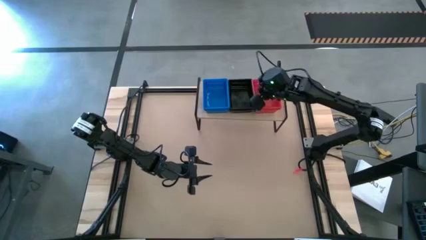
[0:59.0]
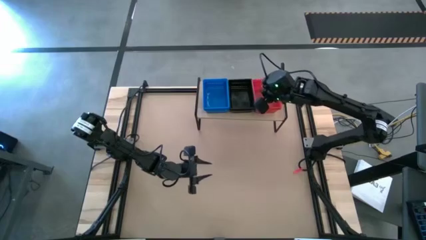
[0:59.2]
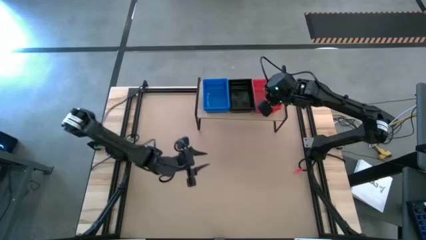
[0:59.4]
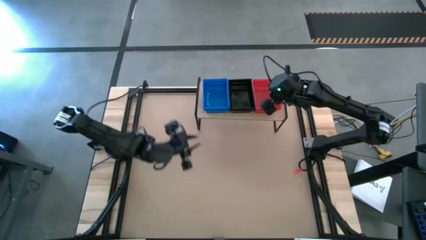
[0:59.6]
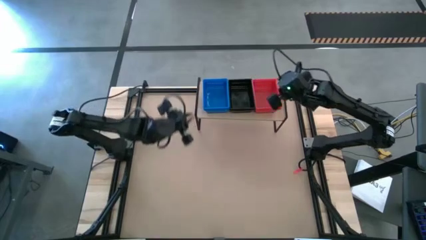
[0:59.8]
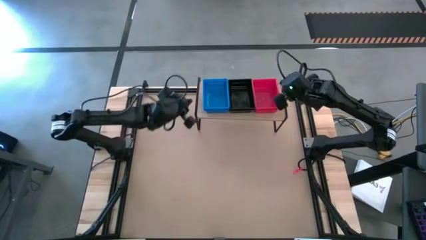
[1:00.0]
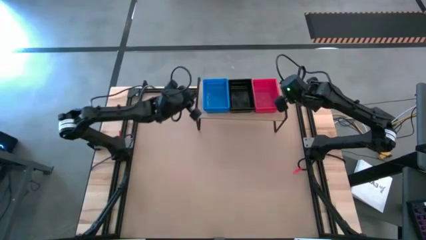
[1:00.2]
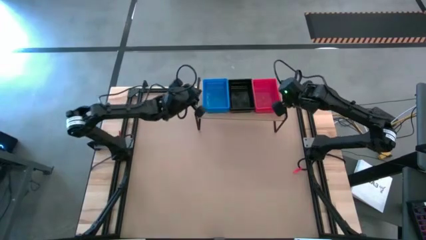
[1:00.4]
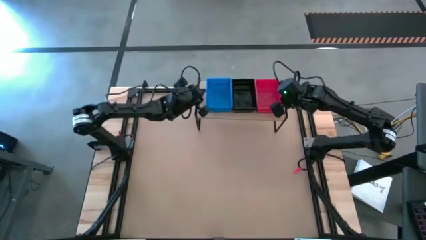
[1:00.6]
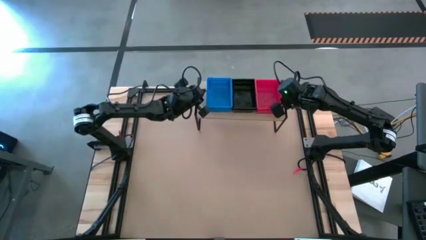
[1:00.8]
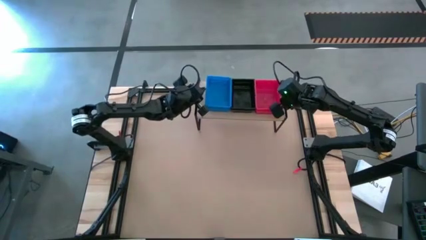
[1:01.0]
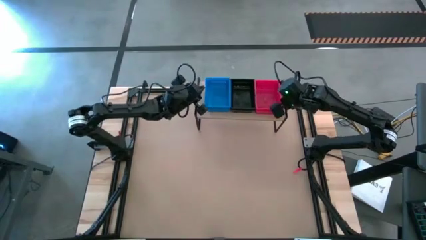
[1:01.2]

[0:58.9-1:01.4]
Task: Stack baskets on shelf by color
Adjust the stacked baskets on the shelf

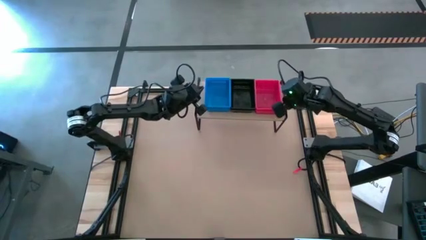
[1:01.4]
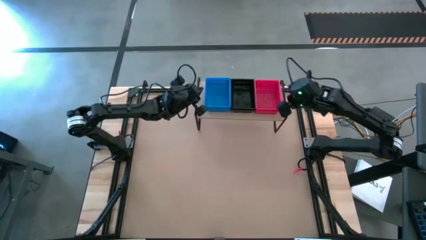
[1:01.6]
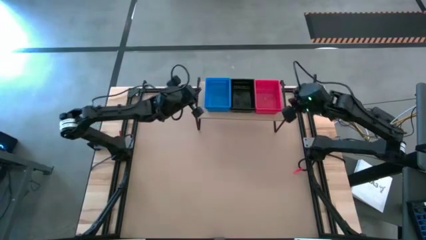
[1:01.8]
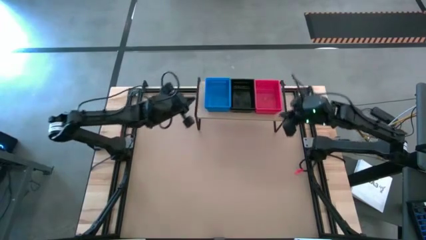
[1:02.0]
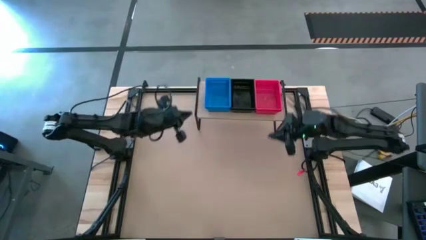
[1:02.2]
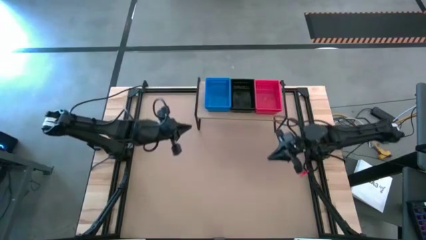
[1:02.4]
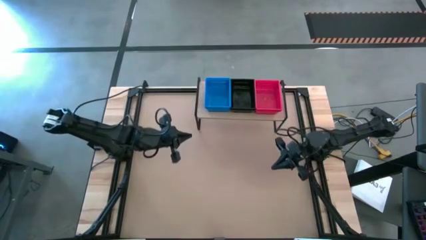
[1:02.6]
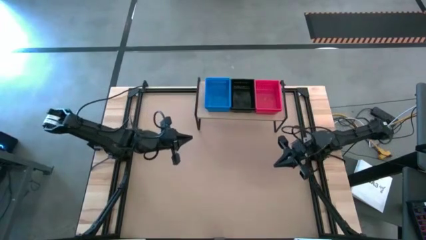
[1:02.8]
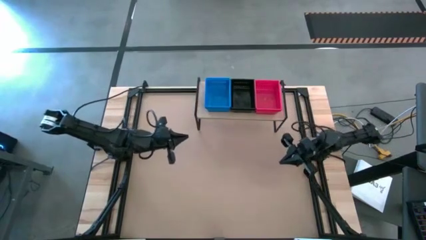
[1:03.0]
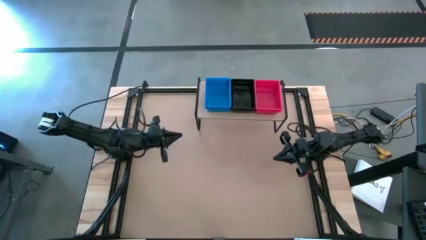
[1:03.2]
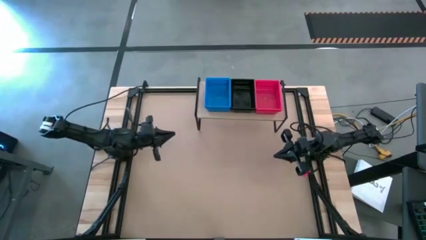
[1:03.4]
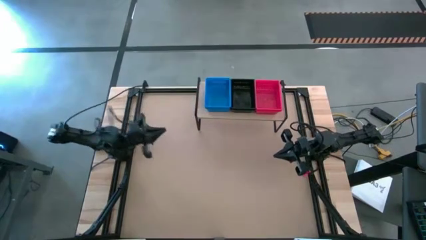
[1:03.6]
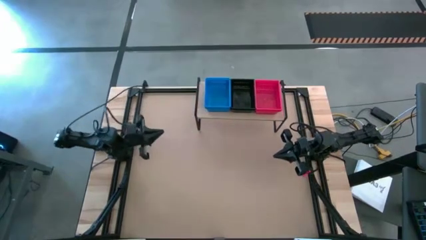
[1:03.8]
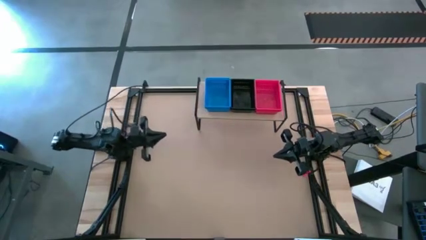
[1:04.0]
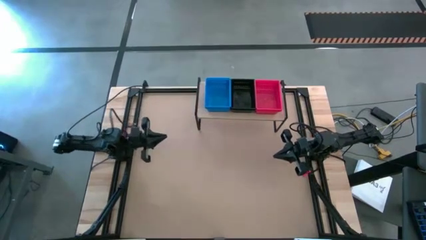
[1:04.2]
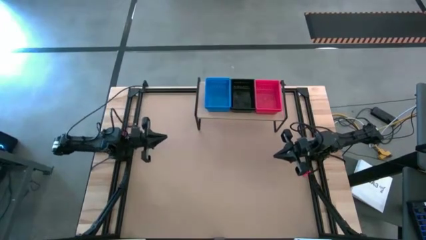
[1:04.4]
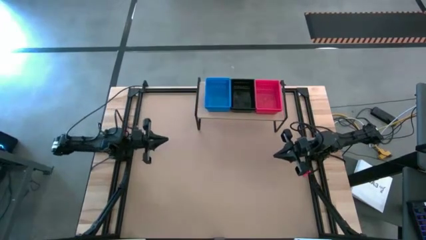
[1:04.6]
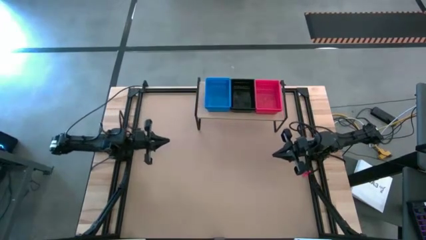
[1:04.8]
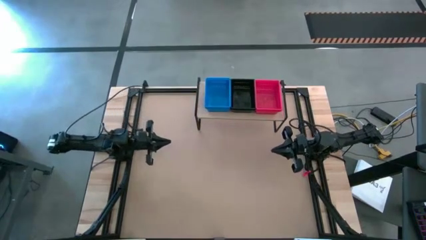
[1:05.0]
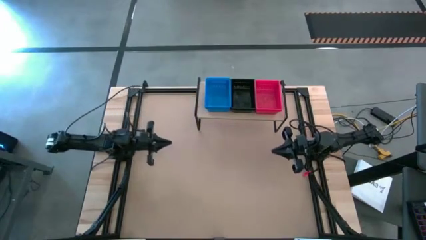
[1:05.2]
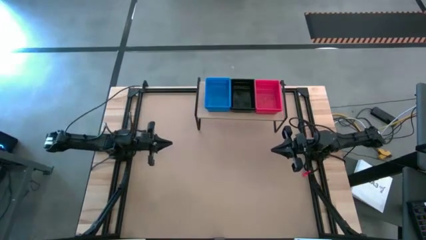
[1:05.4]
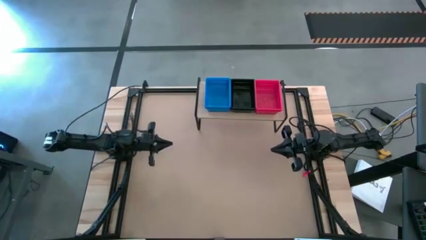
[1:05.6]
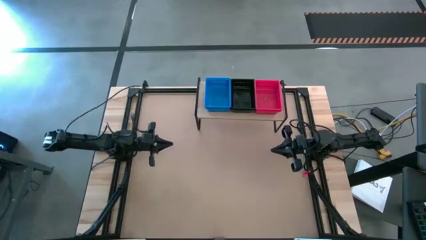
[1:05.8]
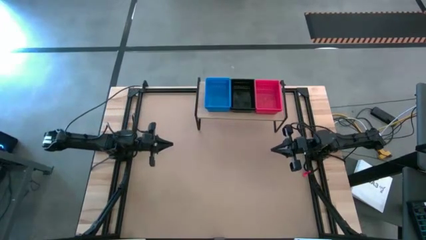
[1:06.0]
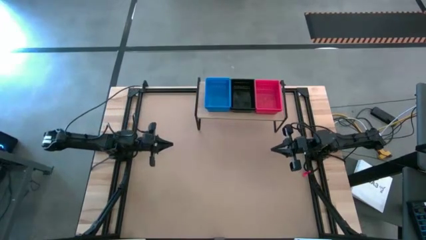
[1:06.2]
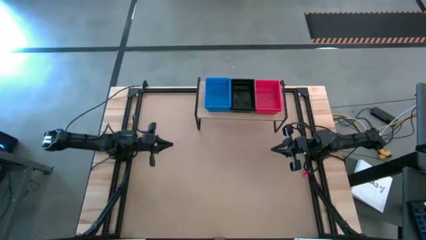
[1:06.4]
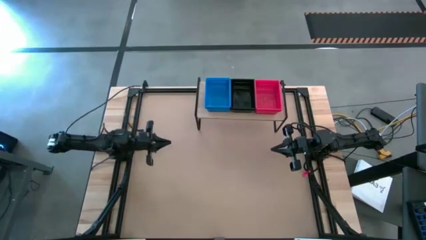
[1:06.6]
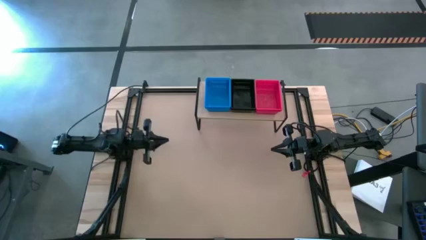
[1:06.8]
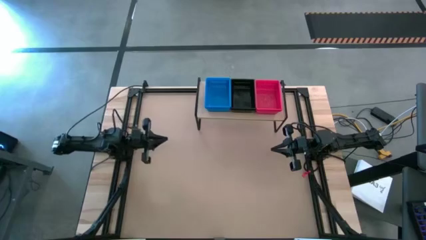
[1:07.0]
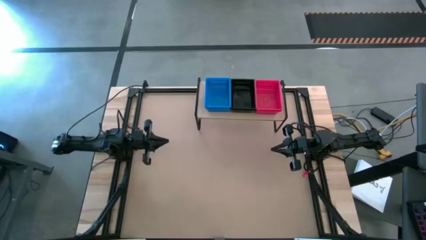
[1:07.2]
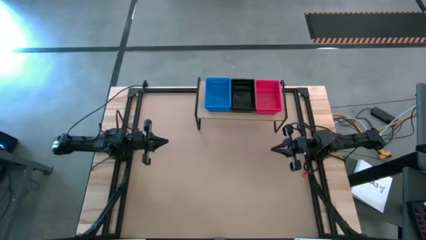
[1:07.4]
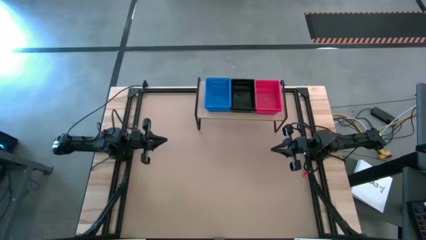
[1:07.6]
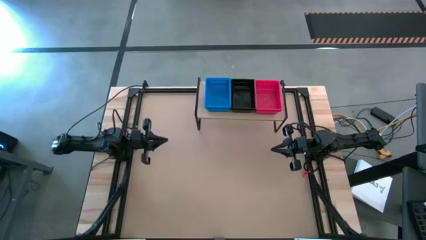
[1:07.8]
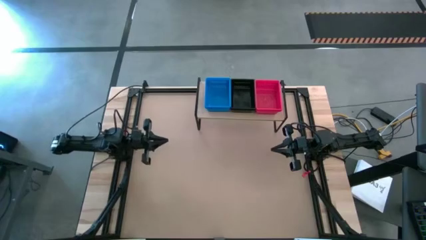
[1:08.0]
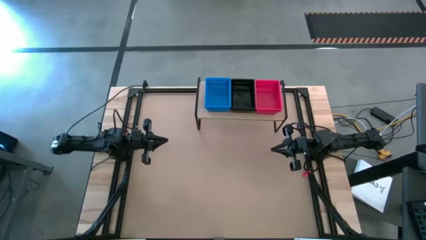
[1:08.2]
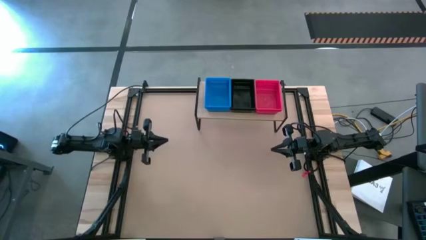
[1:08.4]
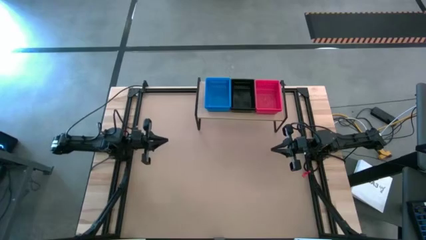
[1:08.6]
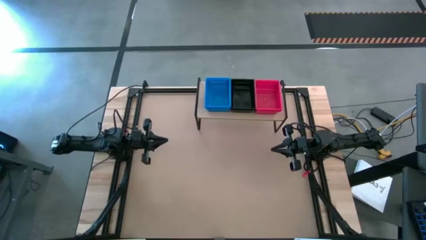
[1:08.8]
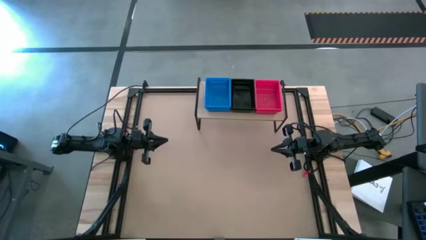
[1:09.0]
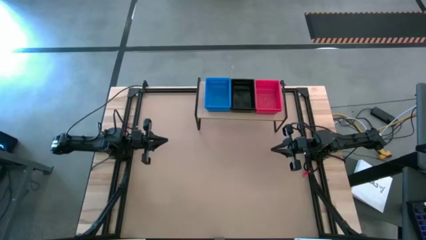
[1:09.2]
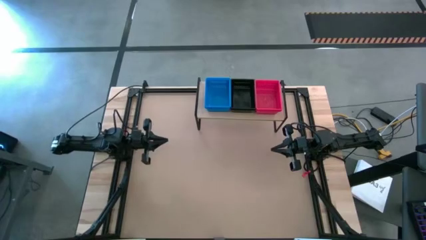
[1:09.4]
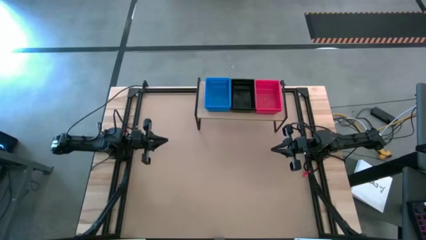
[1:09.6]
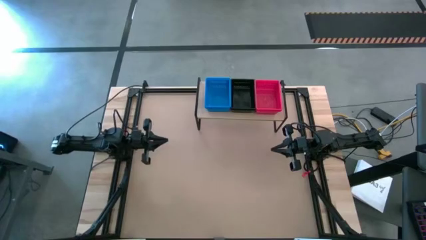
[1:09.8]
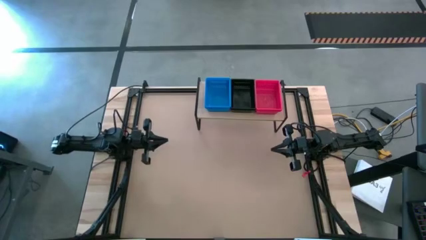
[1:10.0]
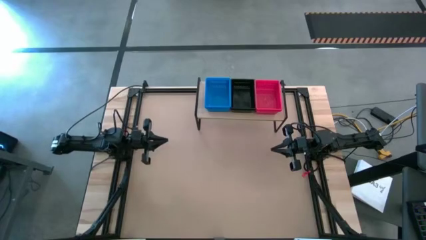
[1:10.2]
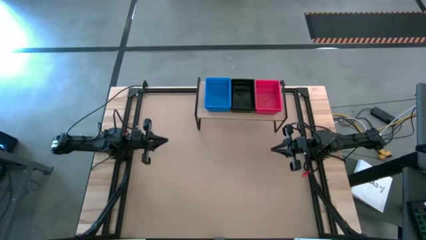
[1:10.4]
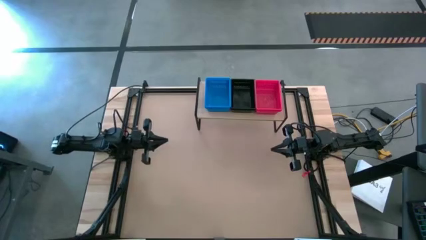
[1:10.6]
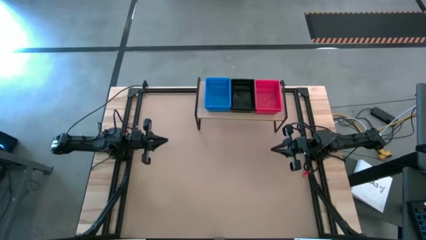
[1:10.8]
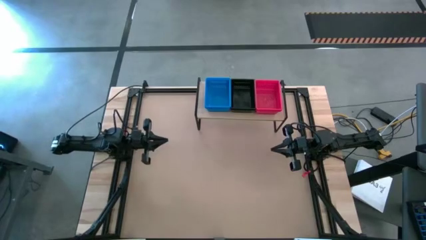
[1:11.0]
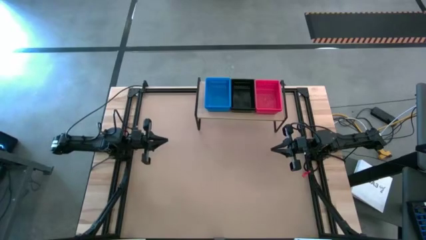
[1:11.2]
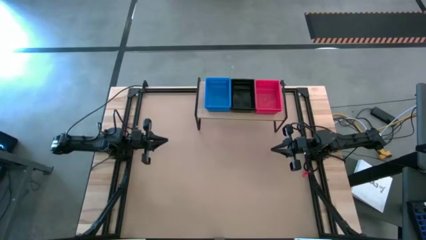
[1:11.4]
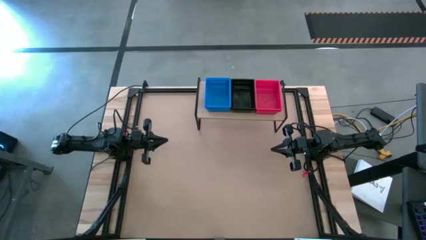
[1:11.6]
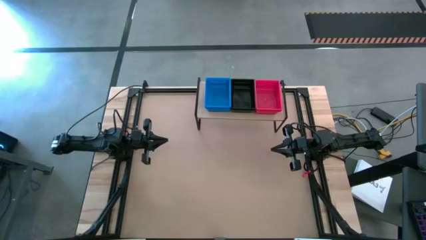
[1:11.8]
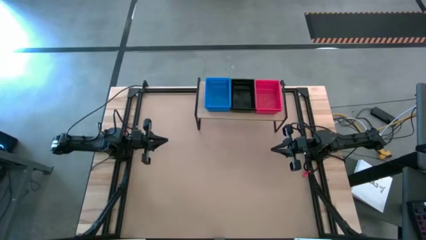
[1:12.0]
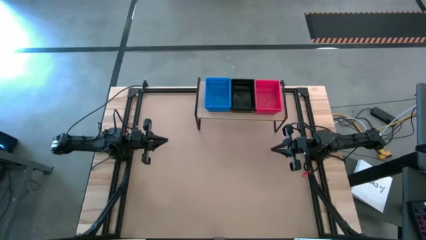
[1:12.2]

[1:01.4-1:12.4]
Return to Home Position
